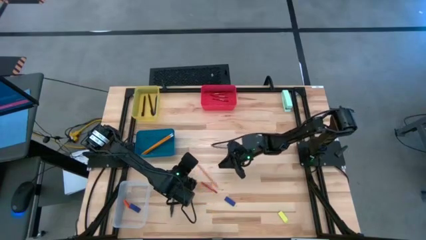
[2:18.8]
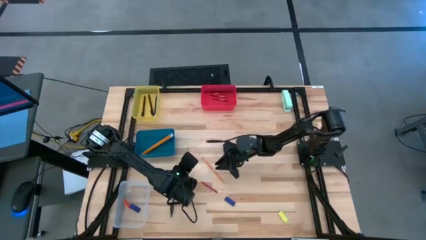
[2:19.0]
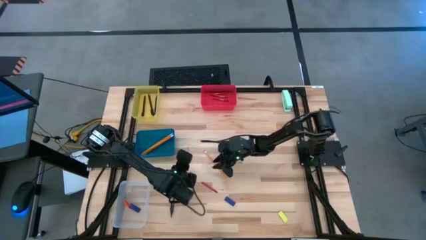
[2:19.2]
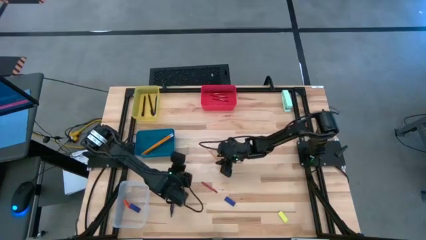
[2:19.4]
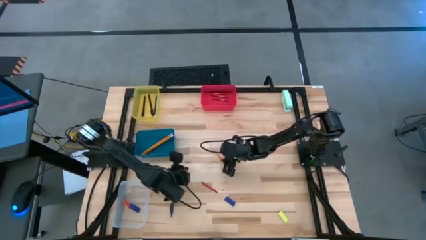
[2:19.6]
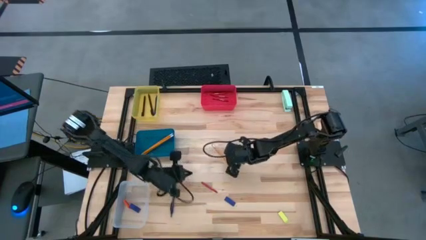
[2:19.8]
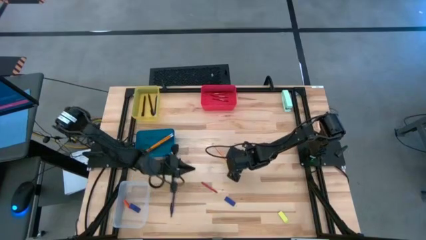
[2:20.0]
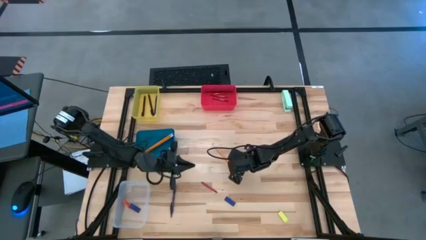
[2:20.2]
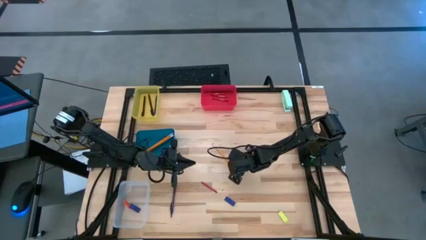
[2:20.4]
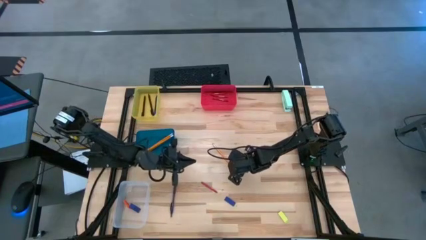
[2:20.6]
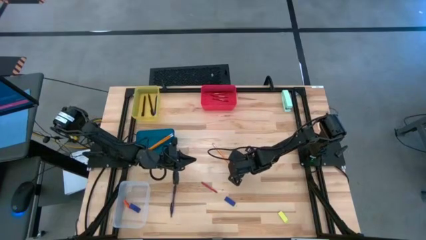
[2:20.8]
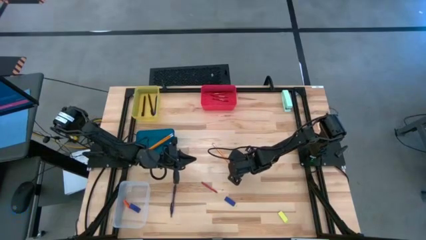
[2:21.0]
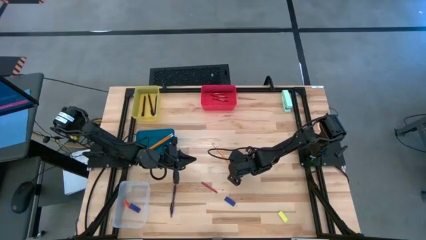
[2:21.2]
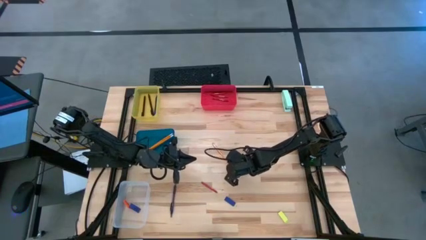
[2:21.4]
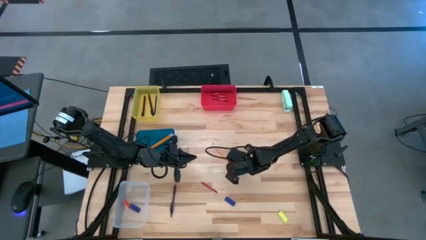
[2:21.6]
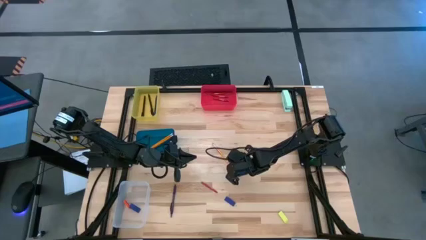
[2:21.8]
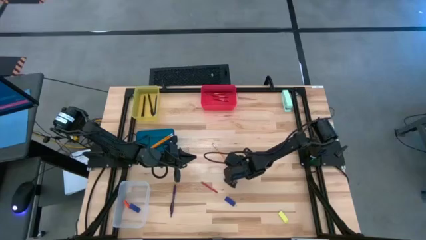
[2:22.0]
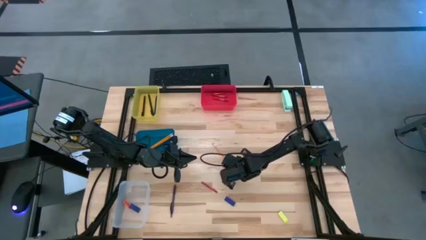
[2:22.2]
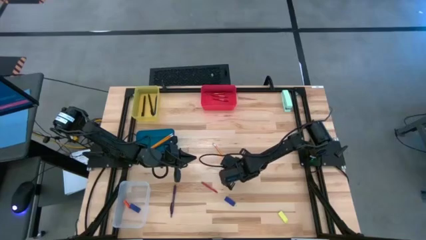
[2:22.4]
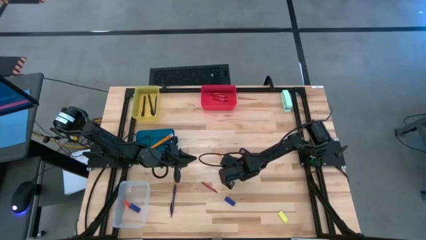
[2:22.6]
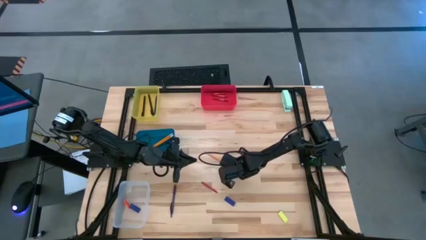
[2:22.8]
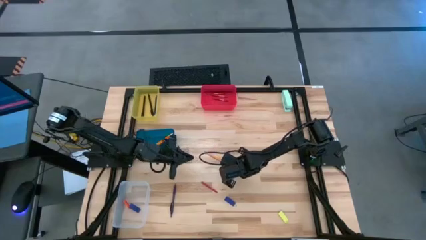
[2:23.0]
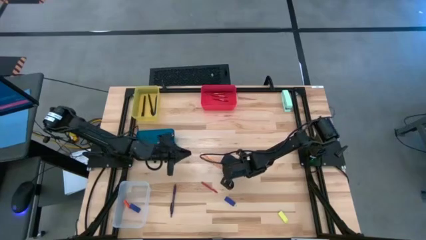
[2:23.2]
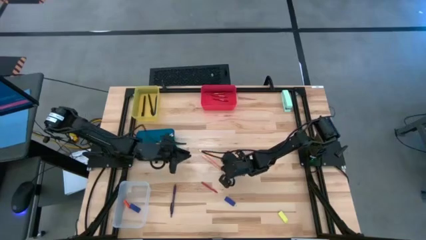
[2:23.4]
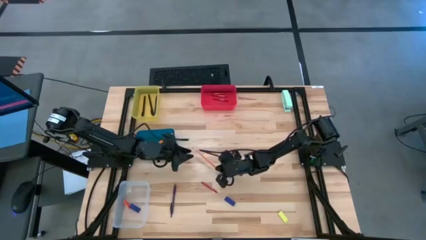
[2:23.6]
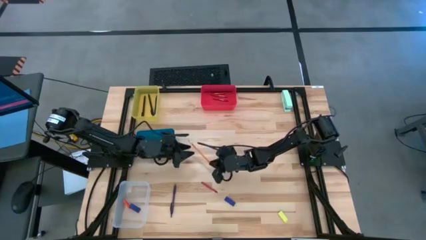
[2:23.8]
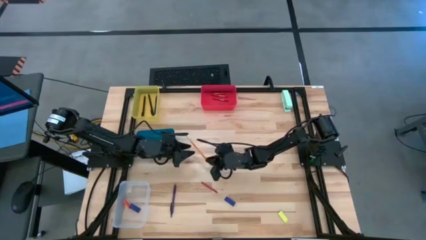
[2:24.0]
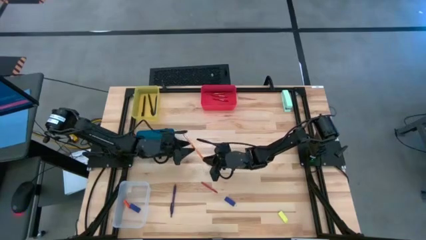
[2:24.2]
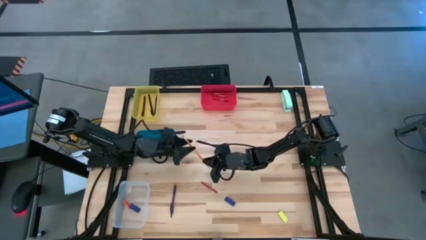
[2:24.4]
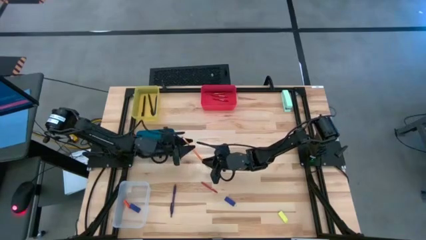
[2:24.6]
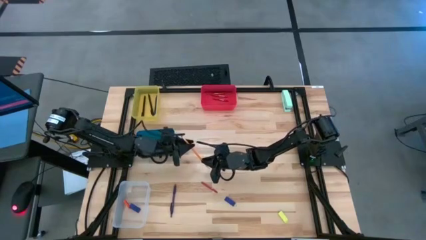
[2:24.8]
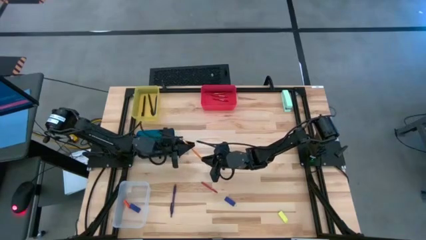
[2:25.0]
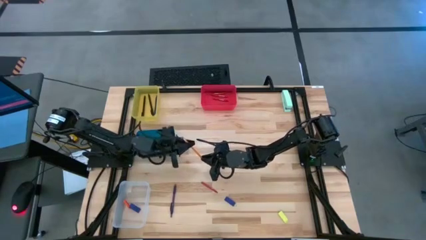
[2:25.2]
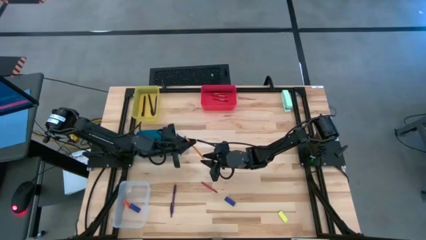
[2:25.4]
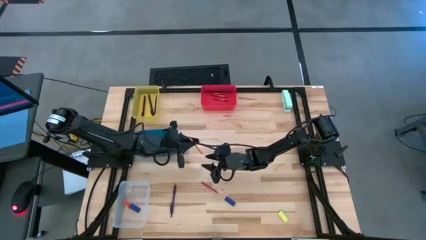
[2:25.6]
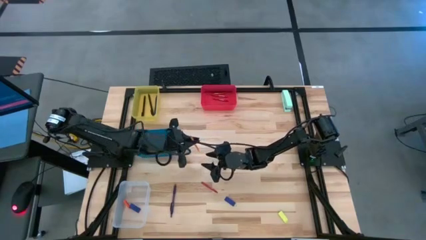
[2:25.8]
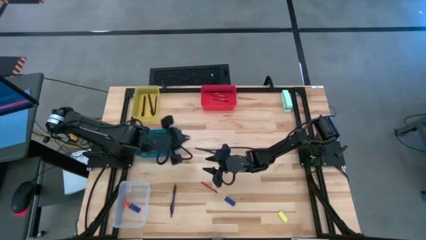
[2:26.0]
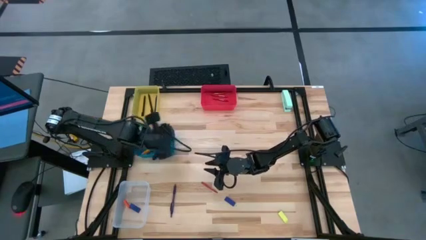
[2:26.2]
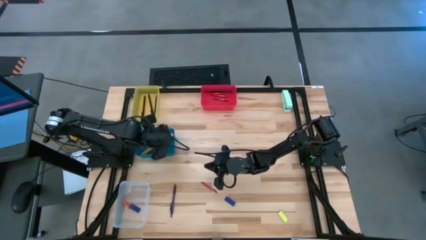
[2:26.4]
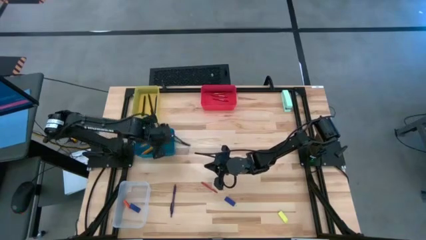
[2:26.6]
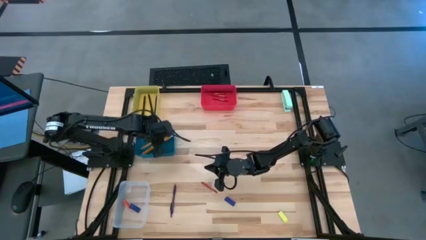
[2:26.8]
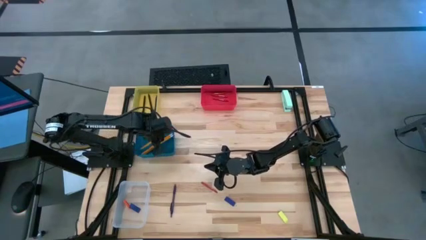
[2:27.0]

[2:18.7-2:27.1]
Task: Sort crayons/erasers/pens/pencils in bins
Put the yellow pencil into the blue bin

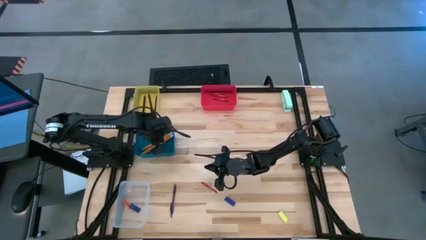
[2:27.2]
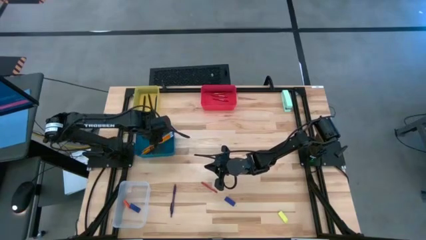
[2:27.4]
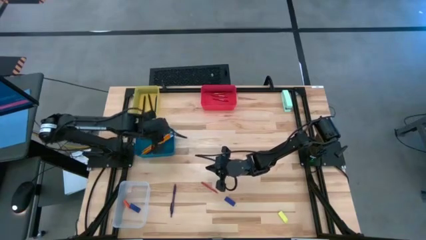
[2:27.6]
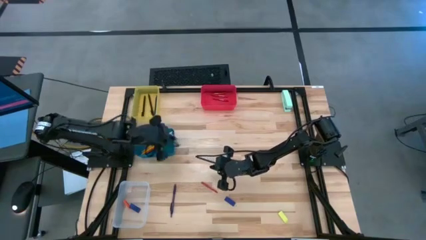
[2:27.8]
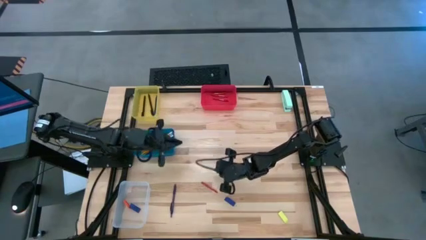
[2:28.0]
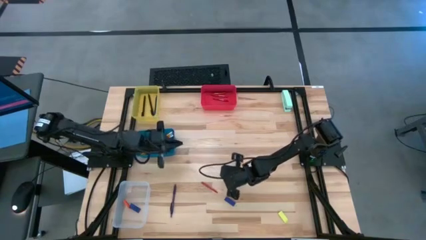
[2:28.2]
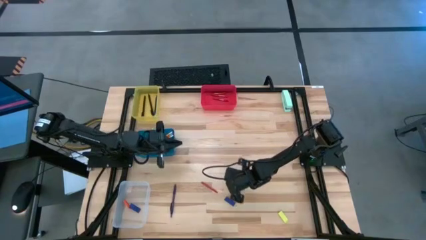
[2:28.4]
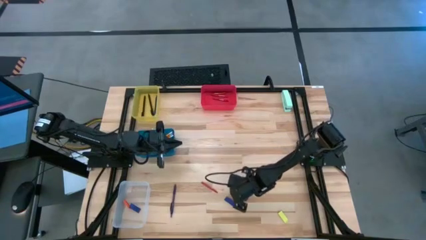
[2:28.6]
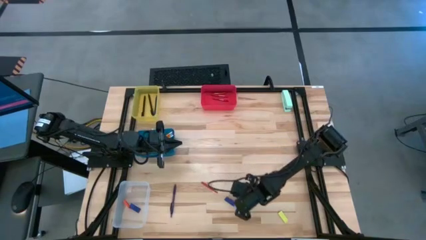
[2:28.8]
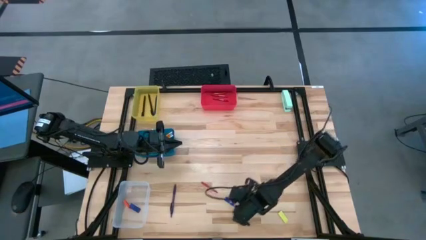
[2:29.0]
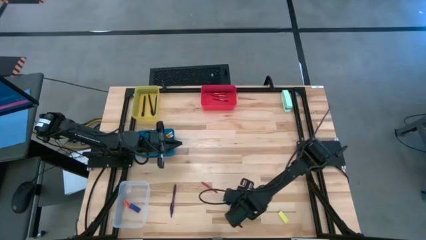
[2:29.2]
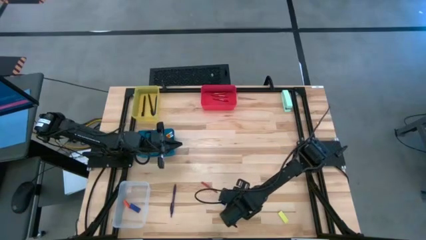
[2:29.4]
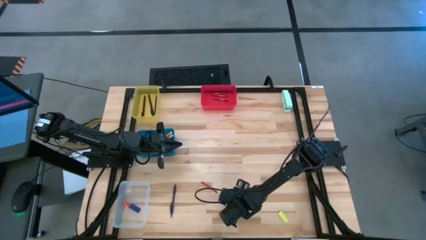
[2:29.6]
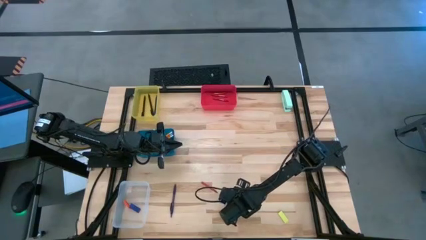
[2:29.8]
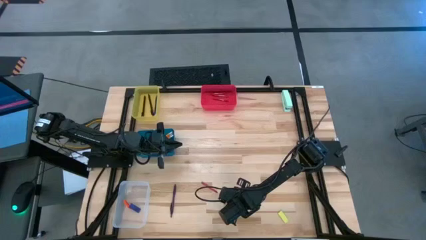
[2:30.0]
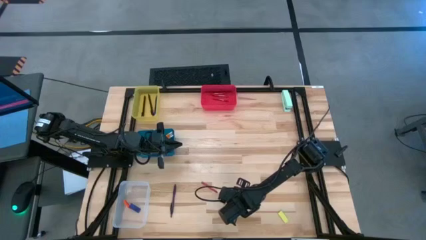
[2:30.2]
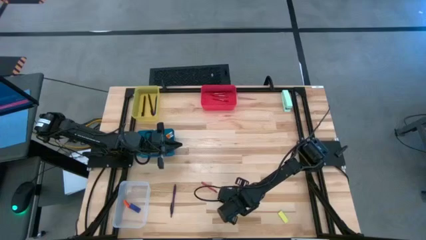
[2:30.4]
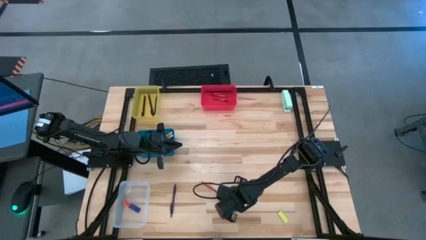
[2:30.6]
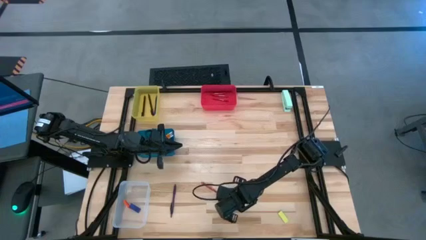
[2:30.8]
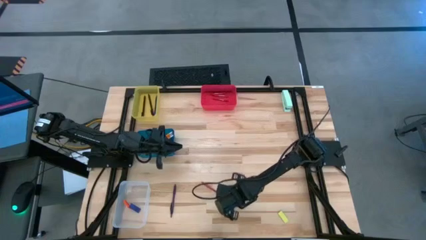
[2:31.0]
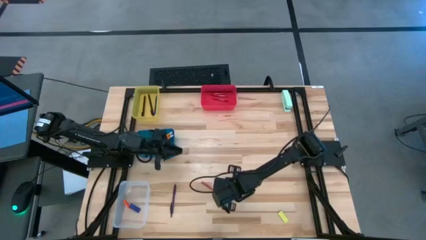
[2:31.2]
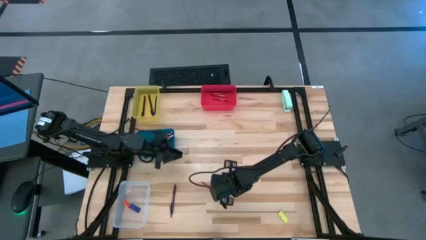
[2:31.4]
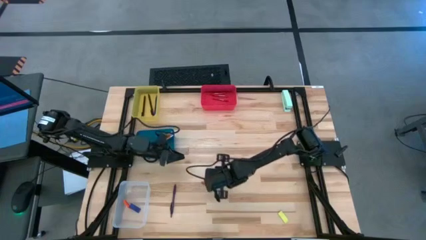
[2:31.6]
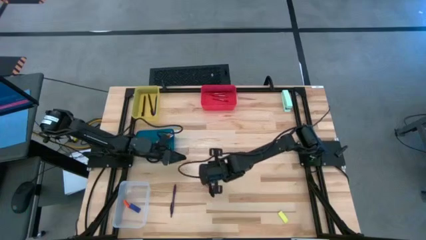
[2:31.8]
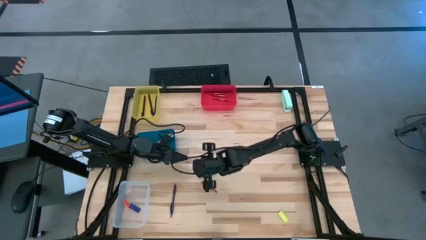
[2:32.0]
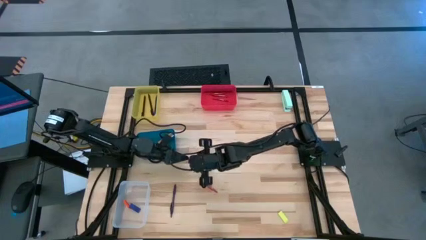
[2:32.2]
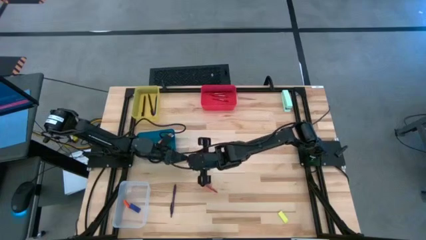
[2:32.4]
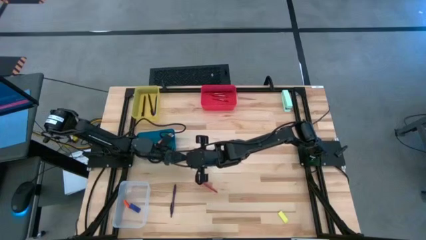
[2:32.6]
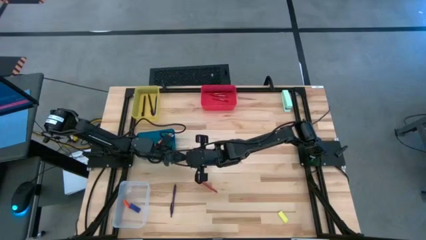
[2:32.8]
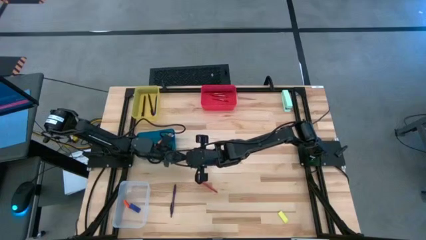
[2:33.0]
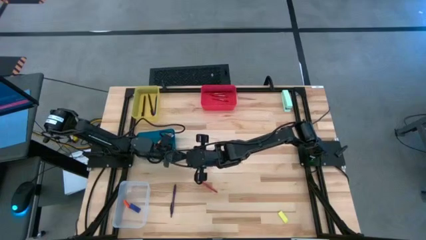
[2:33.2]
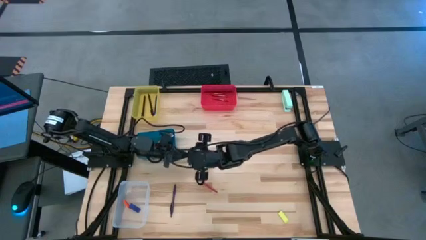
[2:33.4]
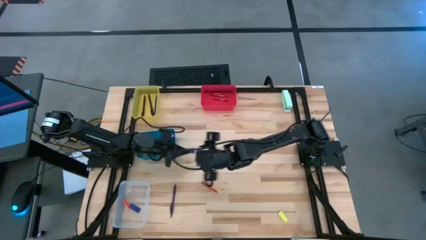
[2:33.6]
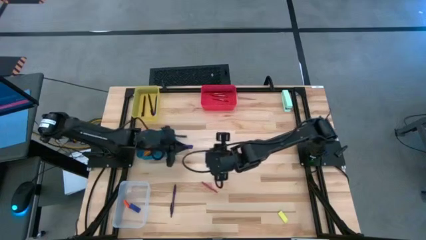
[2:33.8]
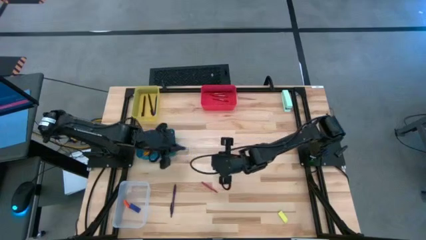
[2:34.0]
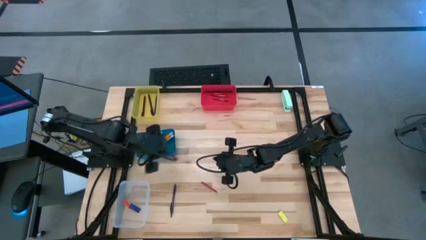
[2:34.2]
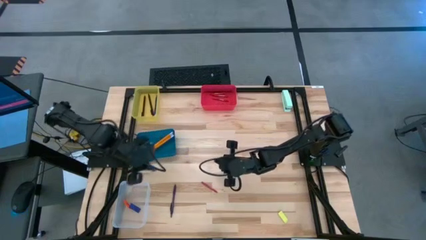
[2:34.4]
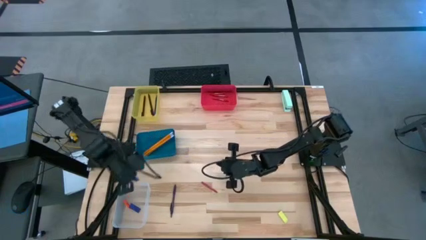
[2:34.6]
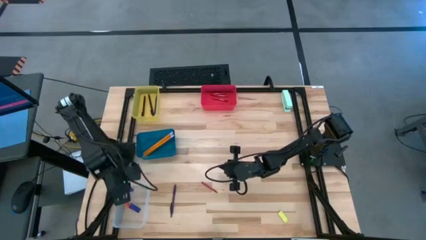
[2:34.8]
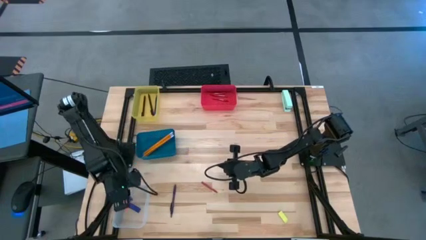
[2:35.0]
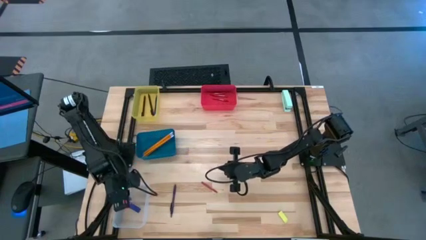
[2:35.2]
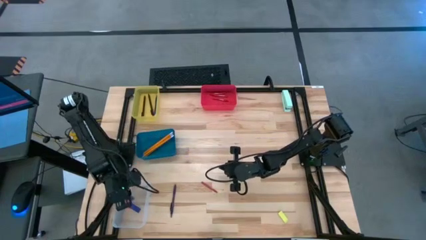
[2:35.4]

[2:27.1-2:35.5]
Put the blue eraser into the transparent bin
